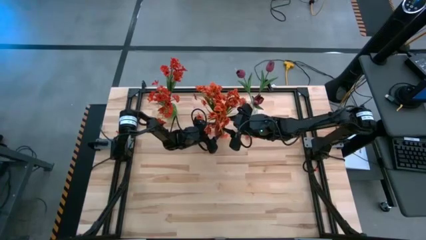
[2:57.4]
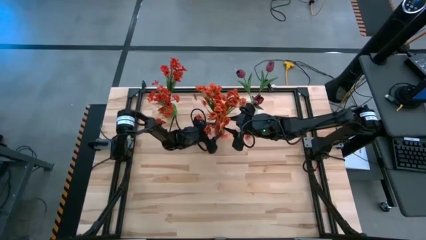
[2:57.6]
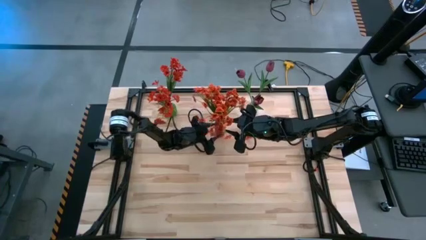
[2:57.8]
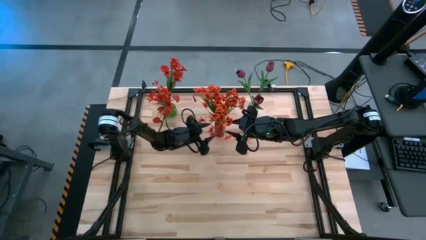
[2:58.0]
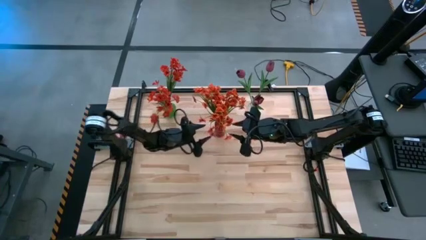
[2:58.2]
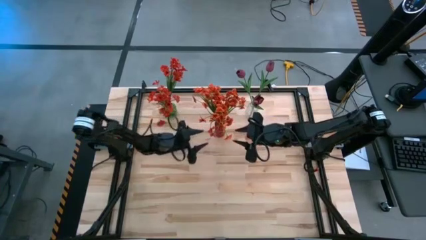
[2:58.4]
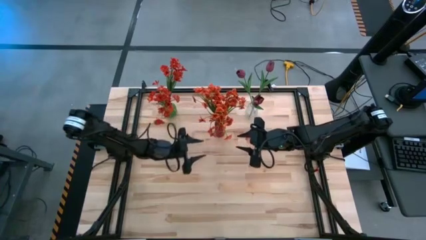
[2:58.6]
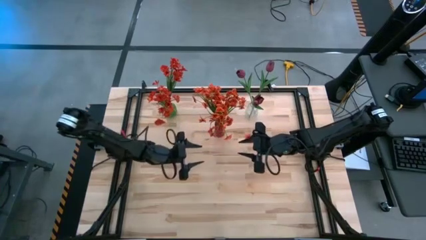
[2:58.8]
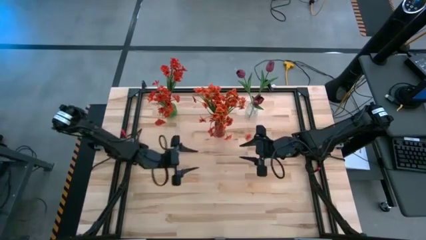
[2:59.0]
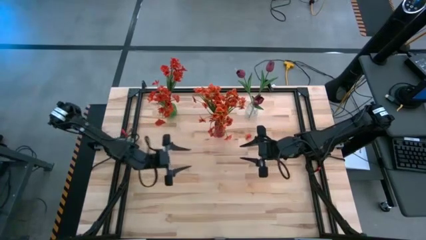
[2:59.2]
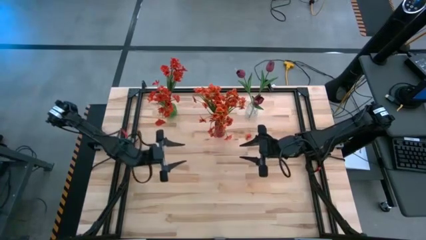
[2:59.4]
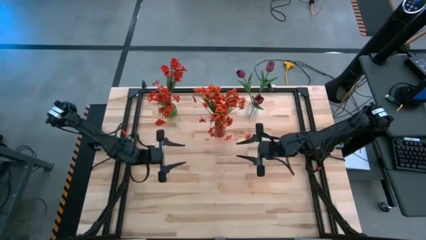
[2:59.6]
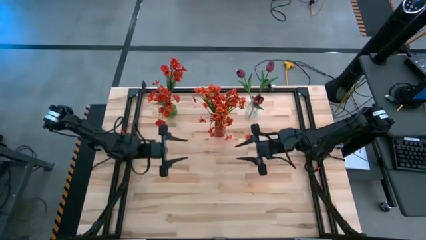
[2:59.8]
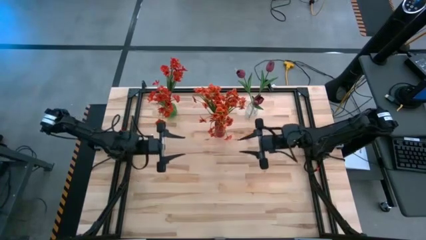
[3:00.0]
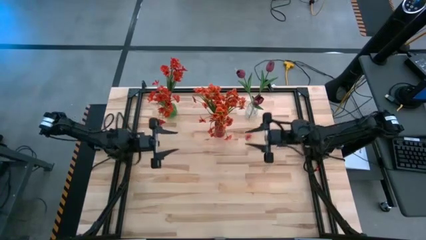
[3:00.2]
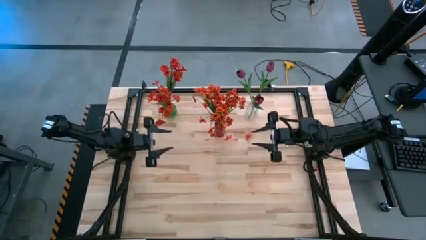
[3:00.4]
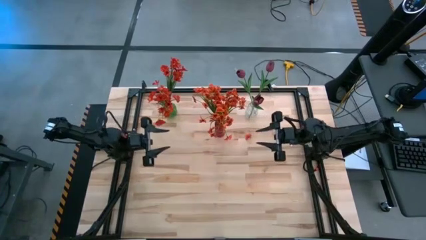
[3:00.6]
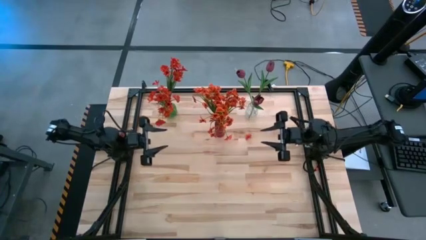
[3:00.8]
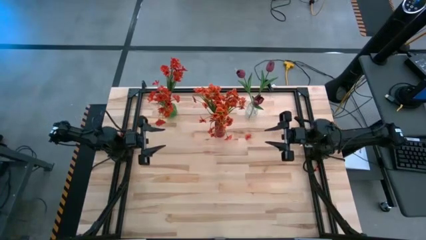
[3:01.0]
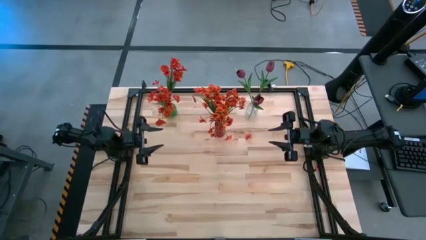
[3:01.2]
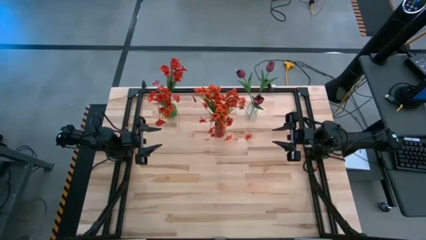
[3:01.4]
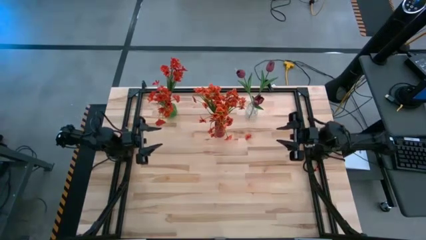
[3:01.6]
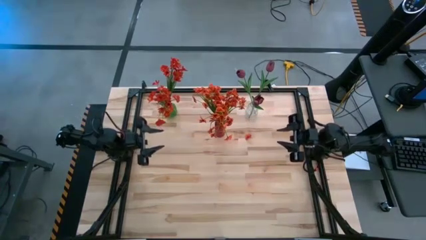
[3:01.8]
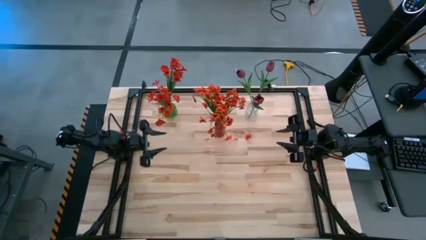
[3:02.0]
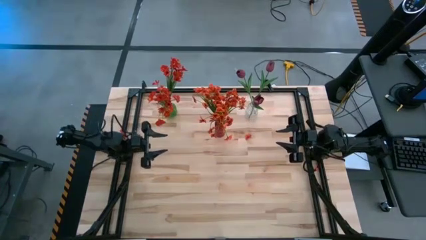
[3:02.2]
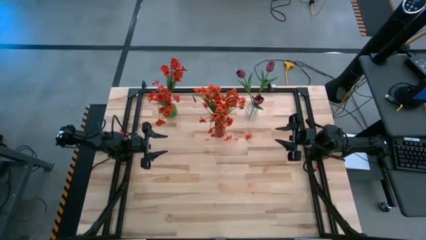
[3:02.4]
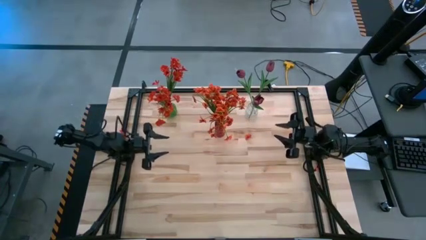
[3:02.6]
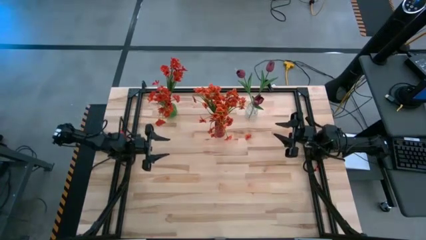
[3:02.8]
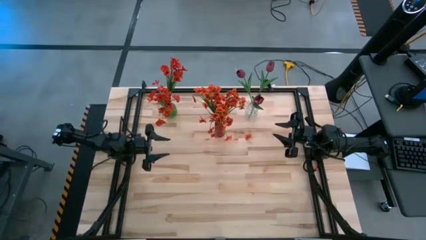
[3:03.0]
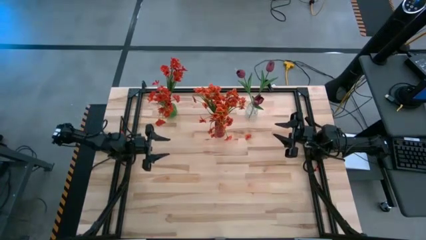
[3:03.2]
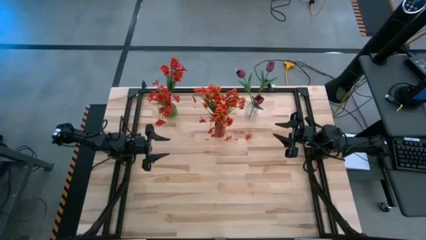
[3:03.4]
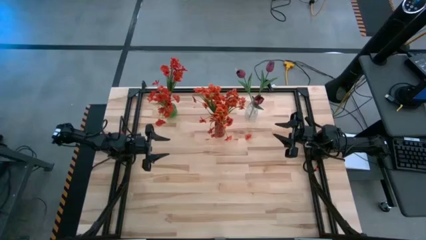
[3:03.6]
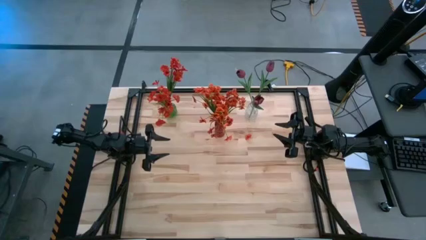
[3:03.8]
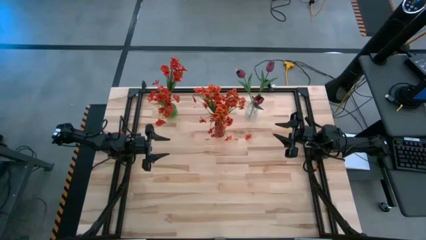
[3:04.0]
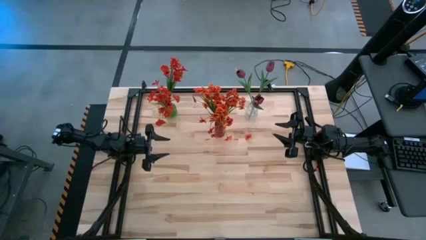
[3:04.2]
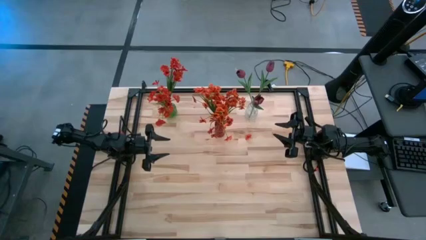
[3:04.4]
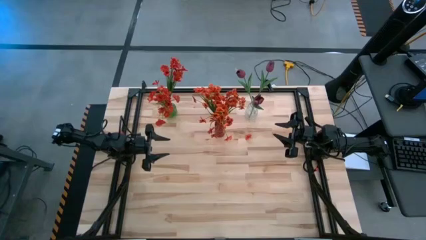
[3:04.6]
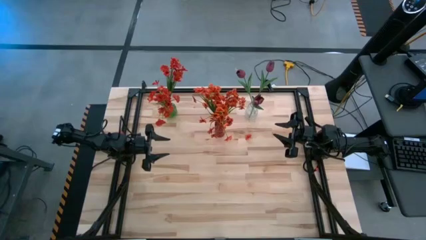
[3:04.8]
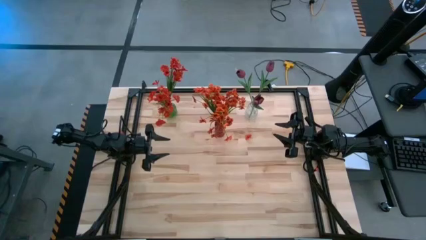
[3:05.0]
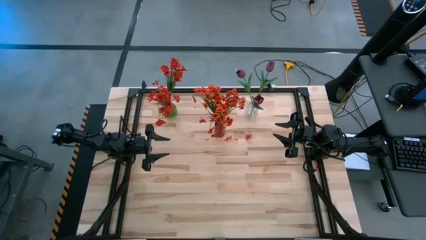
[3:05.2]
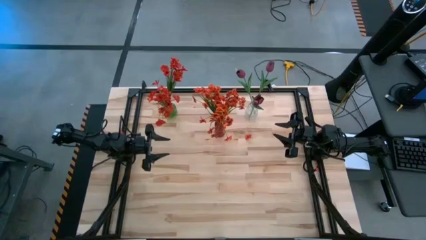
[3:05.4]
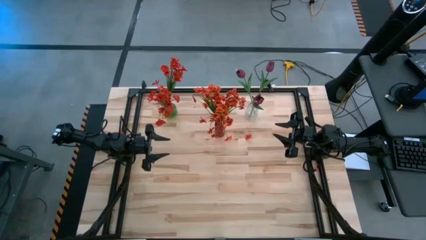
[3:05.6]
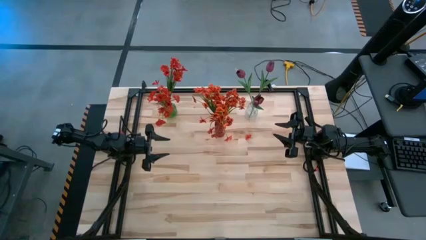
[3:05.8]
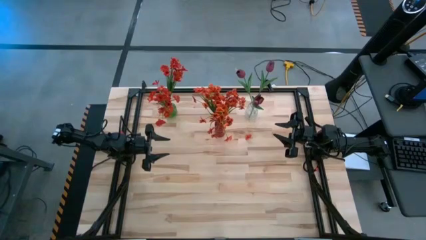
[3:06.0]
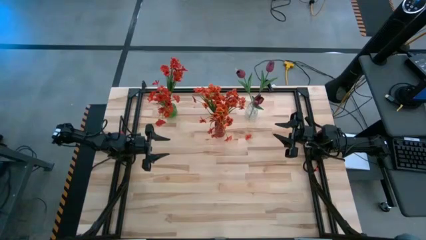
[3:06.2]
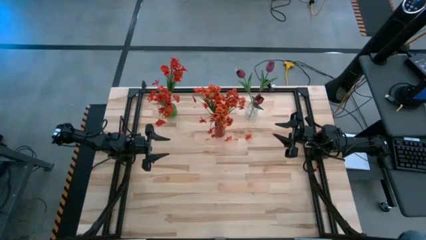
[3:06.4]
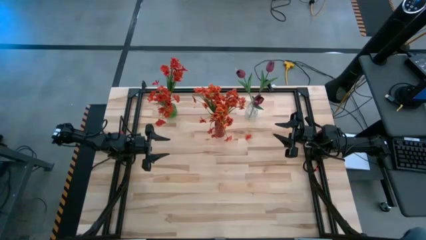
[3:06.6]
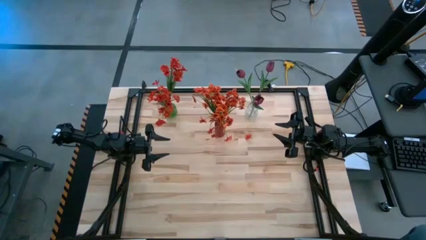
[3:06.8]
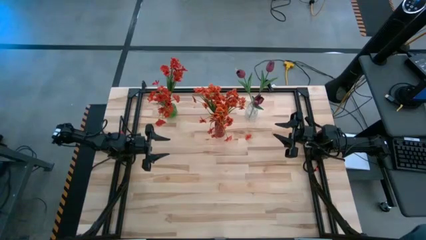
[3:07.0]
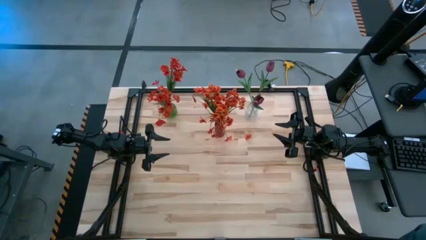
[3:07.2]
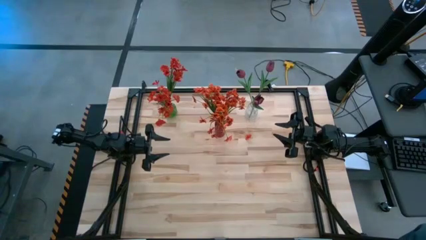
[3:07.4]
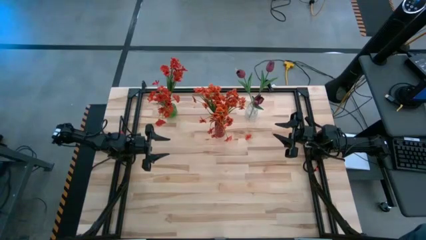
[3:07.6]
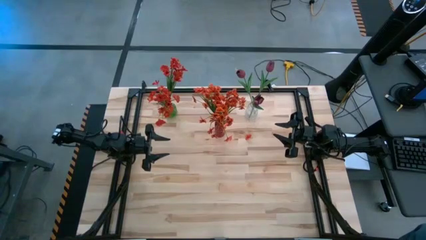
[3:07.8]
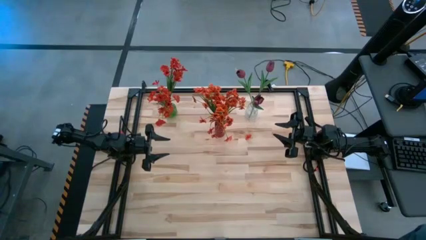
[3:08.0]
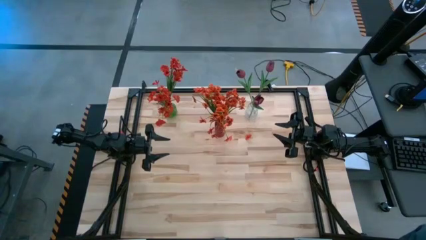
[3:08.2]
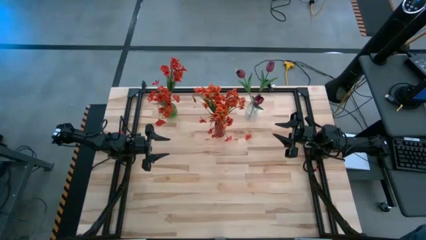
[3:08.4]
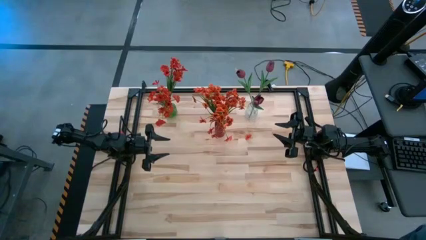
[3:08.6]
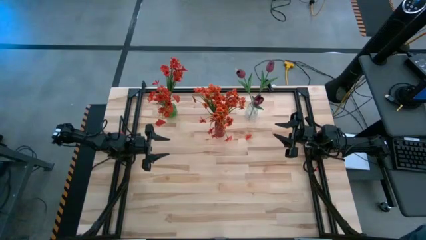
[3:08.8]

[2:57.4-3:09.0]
Task: Sort flowers into vase by color
Return to Home Position

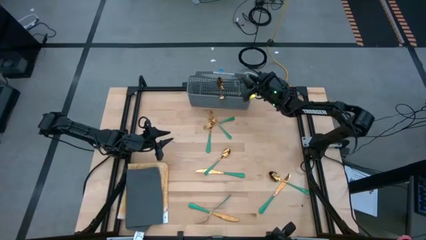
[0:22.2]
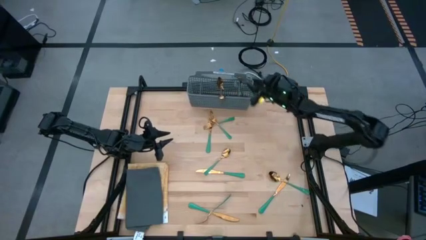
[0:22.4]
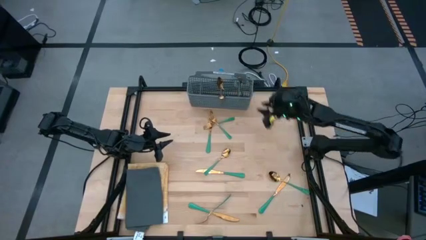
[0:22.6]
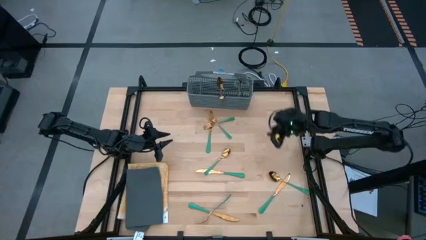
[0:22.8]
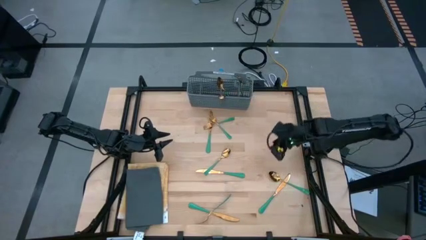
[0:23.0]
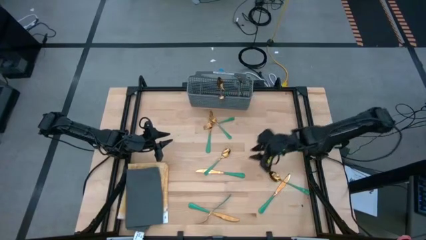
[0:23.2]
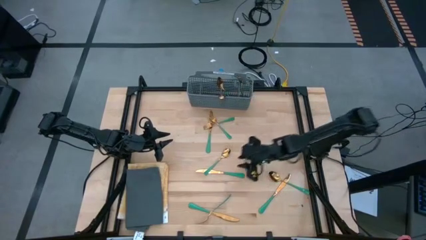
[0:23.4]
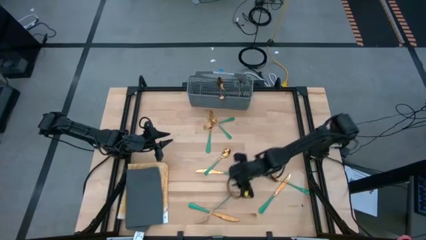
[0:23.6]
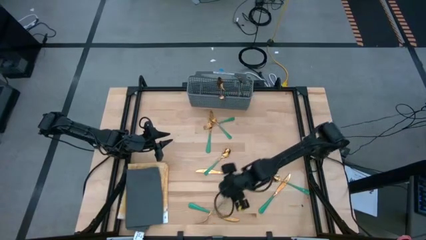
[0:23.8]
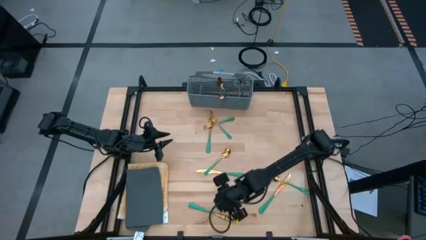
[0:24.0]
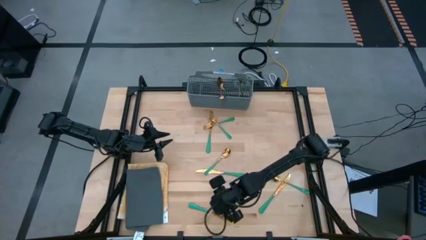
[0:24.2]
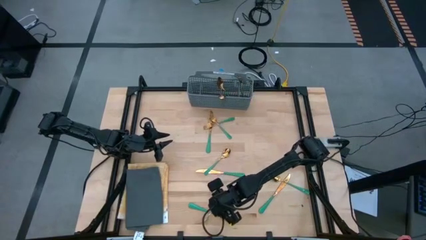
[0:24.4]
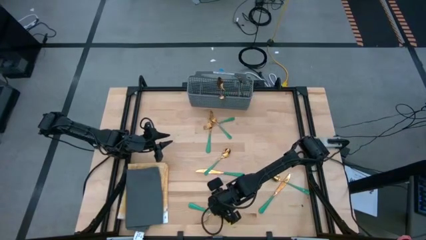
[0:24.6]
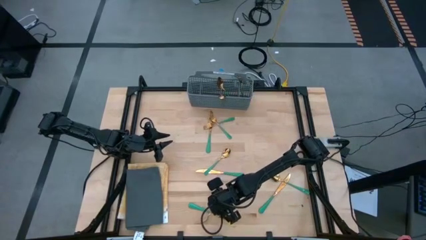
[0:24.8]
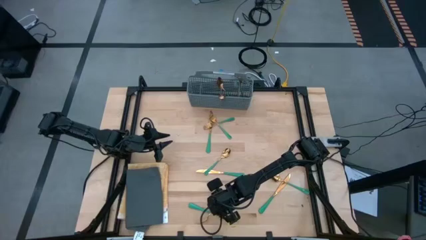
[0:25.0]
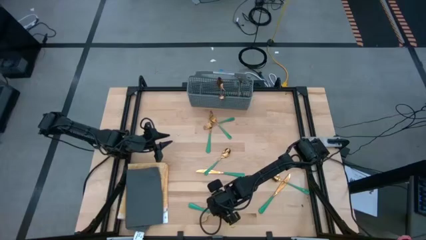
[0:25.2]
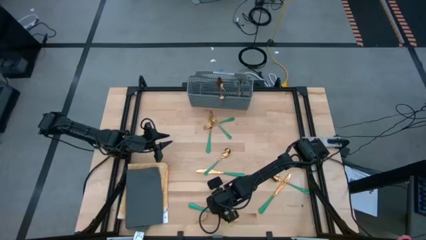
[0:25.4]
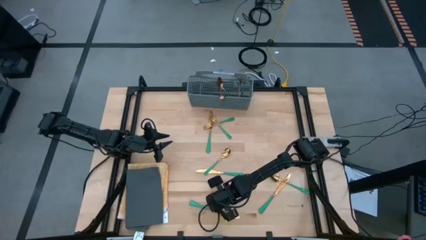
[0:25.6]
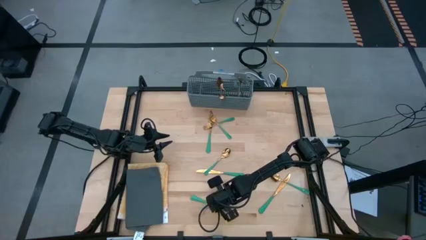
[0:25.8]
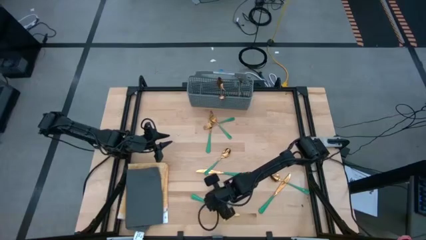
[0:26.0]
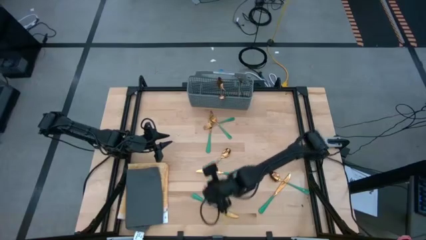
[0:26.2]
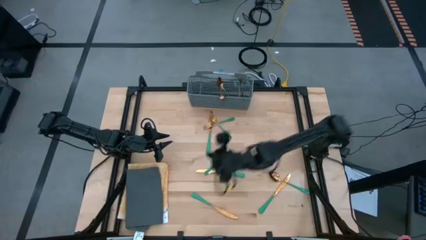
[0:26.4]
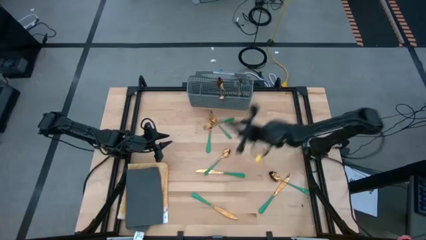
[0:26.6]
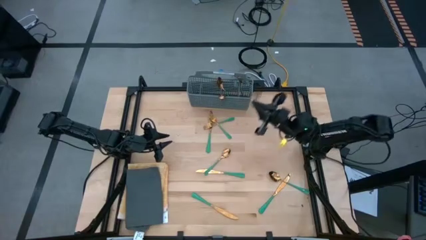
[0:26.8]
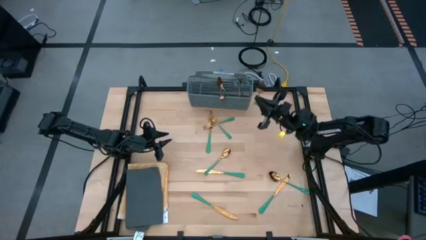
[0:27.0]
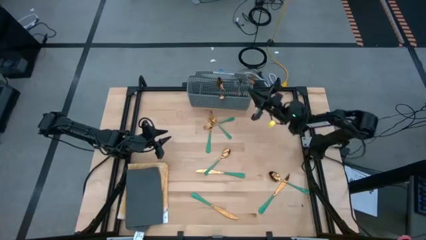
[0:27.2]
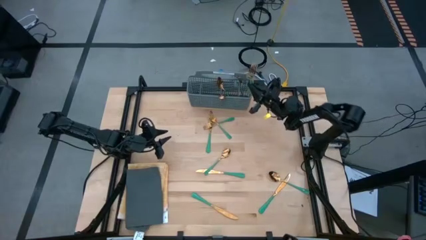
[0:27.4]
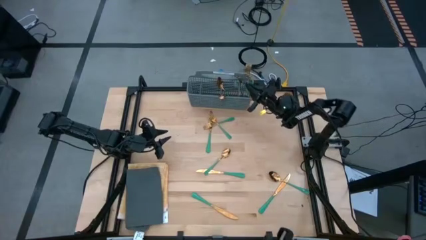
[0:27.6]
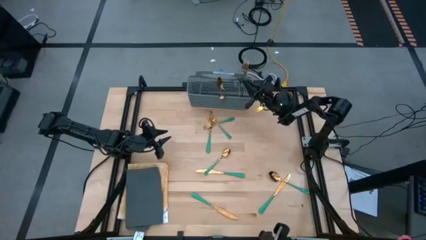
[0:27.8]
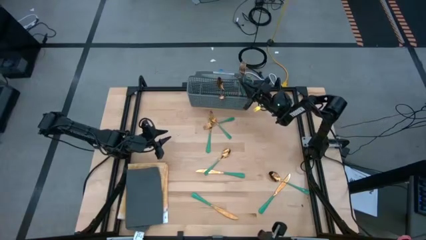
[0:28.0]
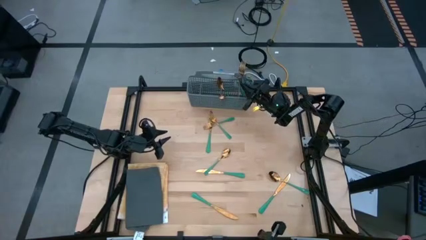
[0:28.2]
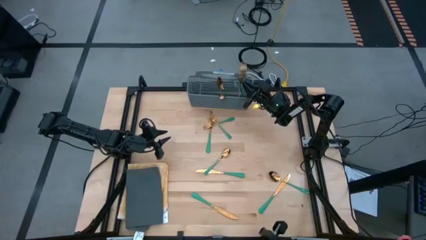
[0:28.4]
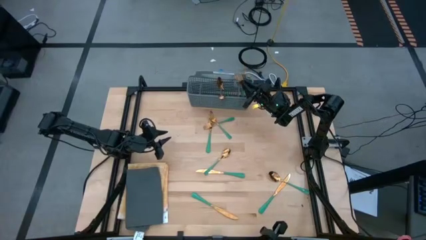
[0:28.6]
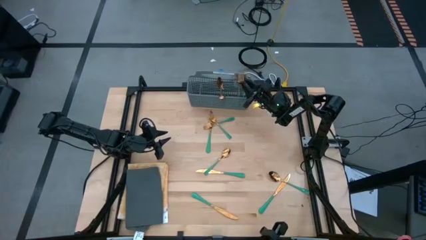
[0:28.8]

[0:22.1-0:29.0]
Task: Sort silverware
Put the green fork into the gray silverware holder
